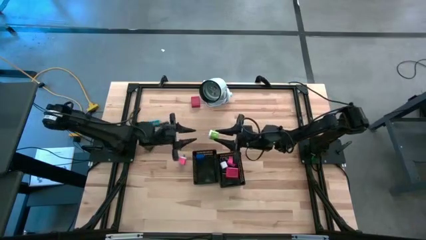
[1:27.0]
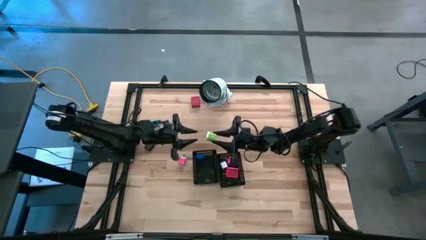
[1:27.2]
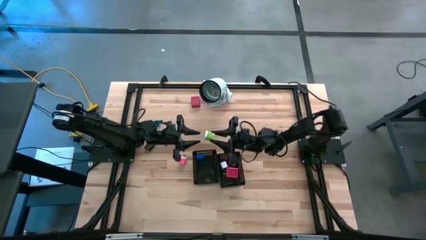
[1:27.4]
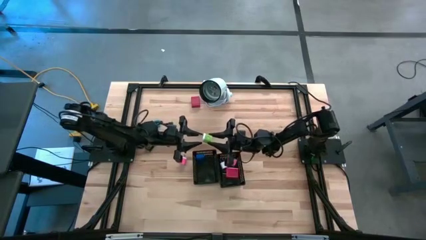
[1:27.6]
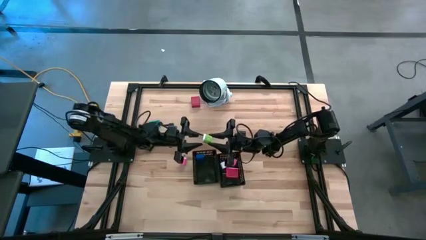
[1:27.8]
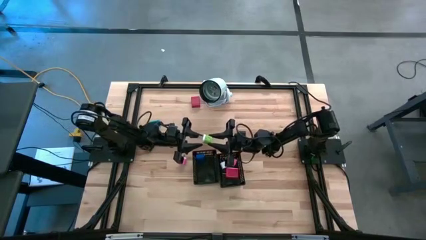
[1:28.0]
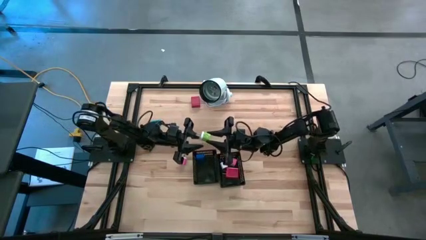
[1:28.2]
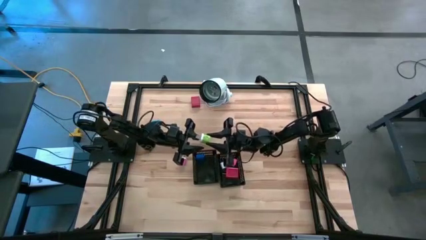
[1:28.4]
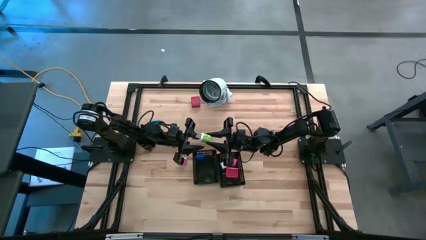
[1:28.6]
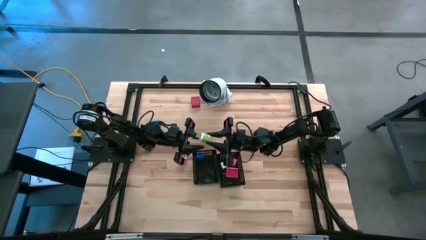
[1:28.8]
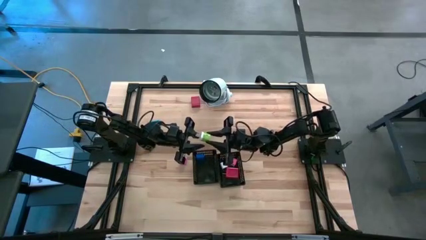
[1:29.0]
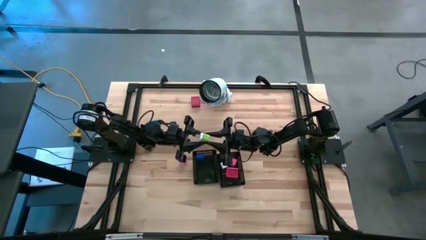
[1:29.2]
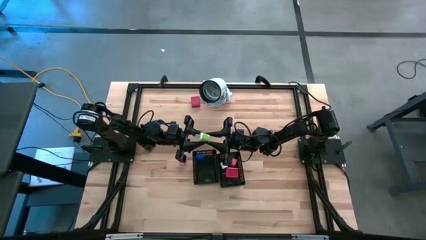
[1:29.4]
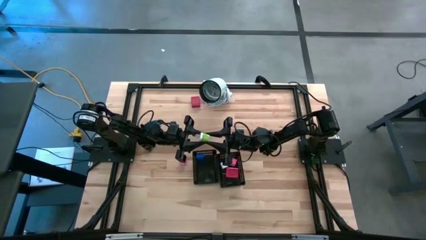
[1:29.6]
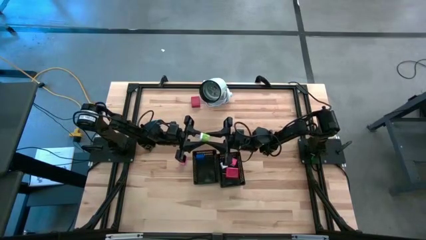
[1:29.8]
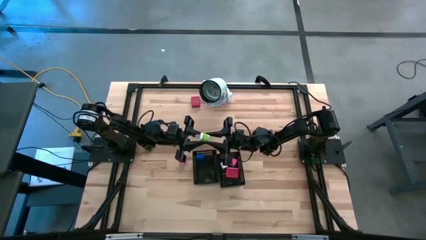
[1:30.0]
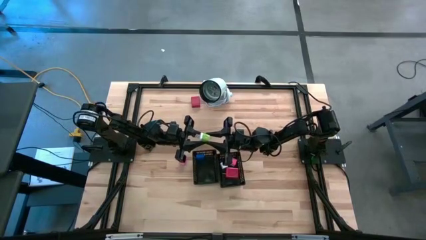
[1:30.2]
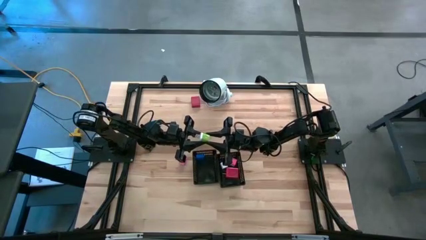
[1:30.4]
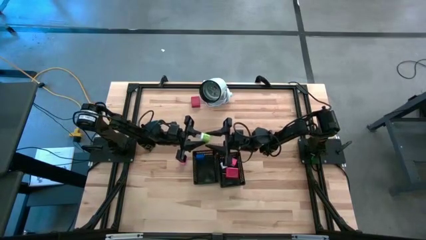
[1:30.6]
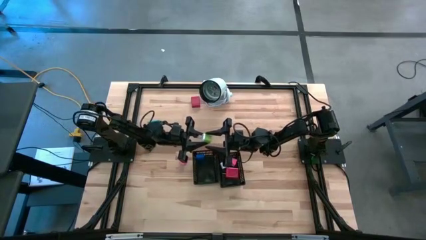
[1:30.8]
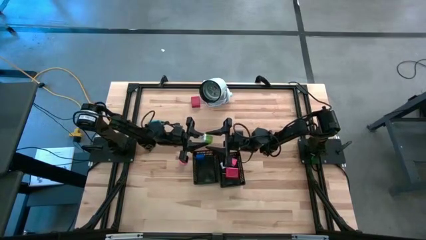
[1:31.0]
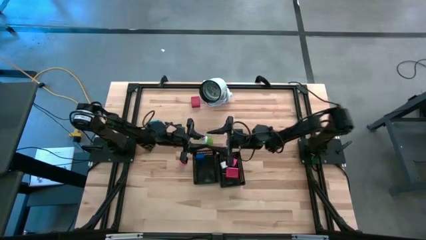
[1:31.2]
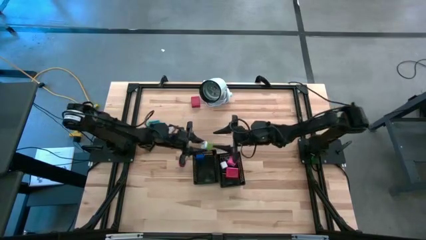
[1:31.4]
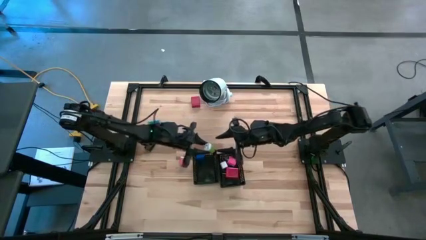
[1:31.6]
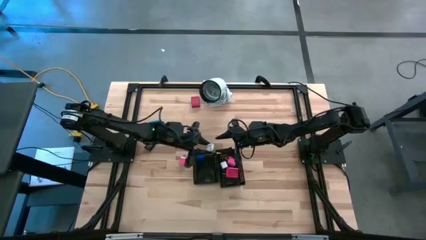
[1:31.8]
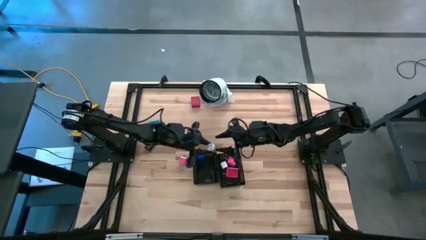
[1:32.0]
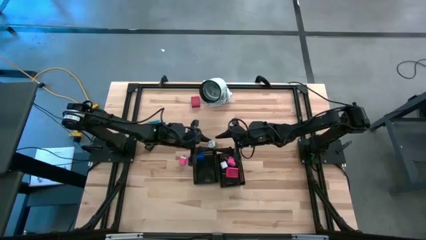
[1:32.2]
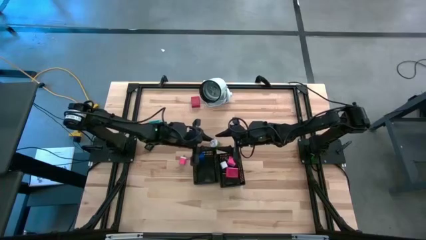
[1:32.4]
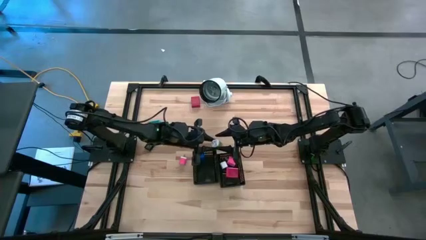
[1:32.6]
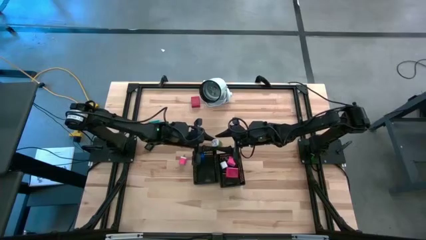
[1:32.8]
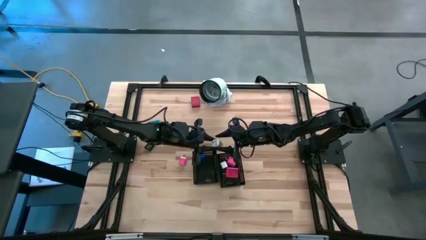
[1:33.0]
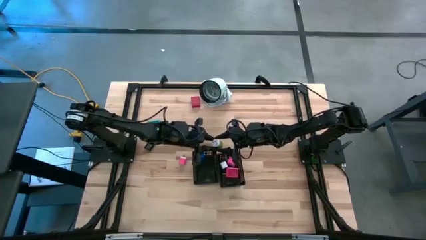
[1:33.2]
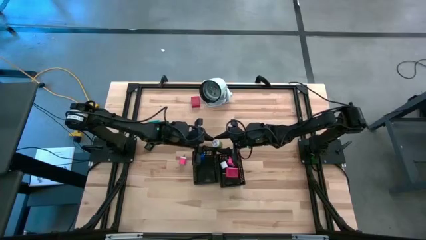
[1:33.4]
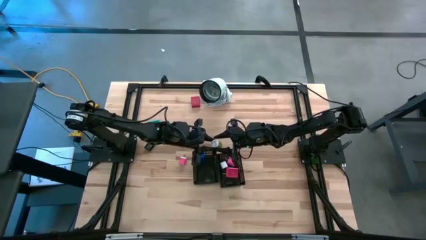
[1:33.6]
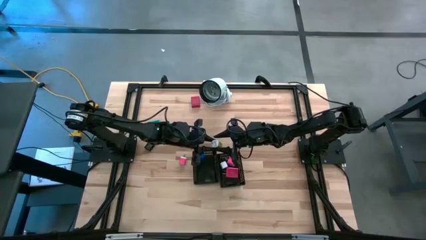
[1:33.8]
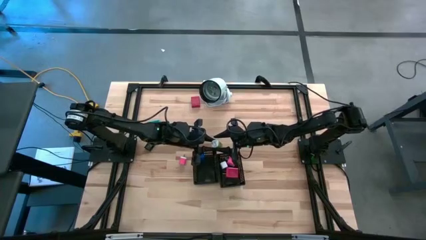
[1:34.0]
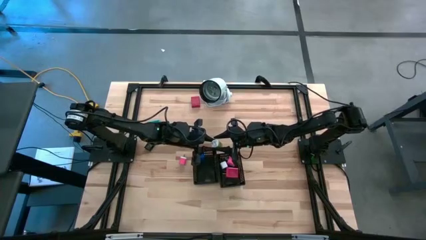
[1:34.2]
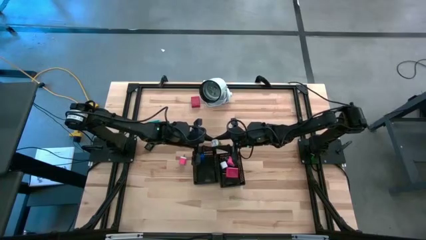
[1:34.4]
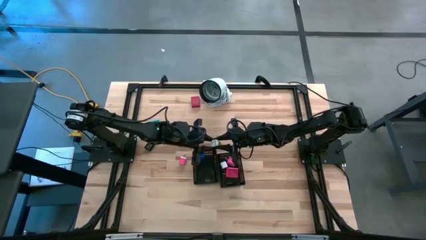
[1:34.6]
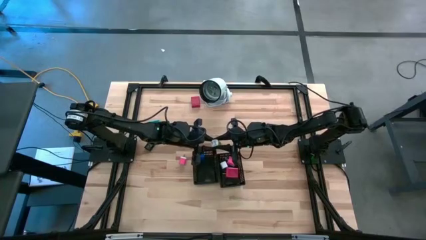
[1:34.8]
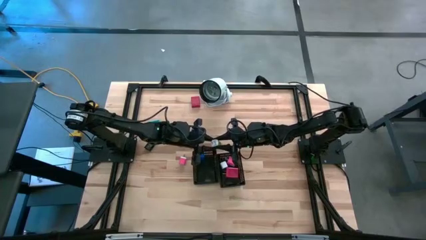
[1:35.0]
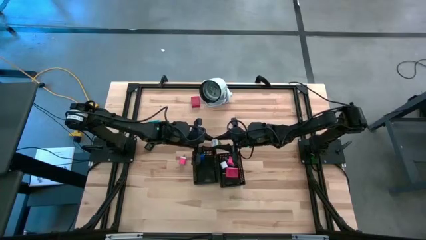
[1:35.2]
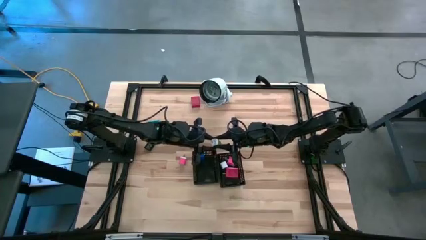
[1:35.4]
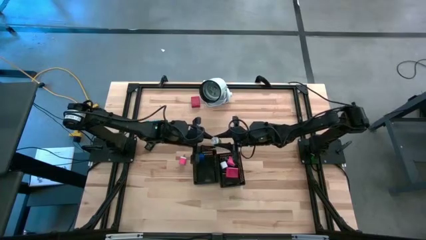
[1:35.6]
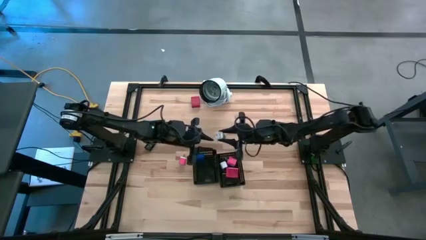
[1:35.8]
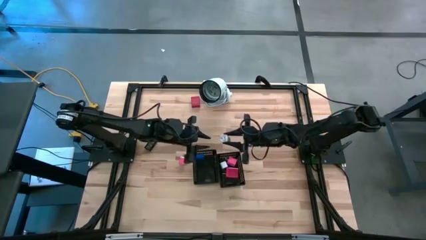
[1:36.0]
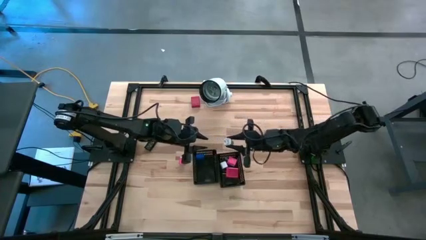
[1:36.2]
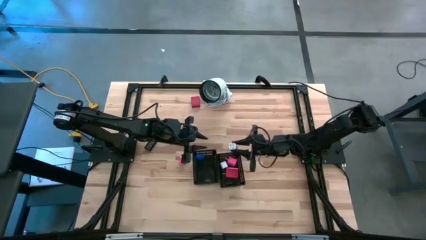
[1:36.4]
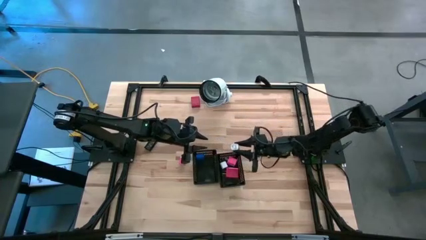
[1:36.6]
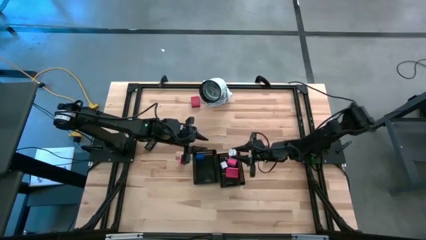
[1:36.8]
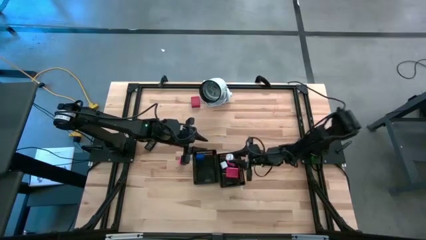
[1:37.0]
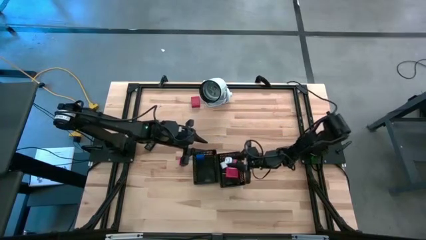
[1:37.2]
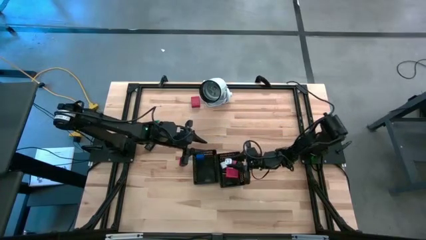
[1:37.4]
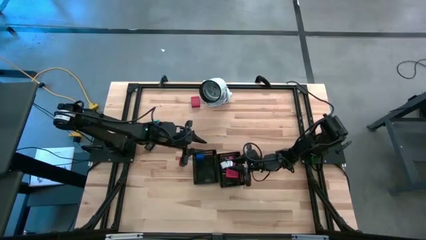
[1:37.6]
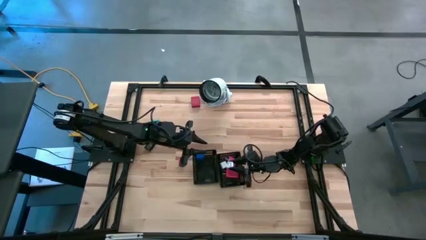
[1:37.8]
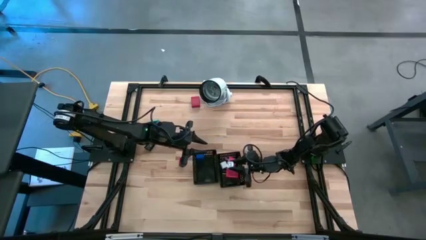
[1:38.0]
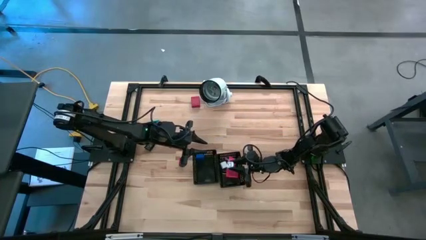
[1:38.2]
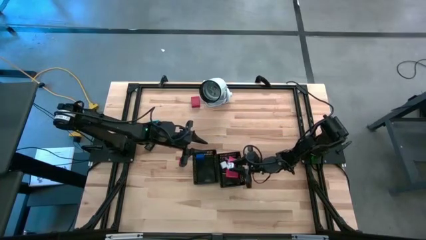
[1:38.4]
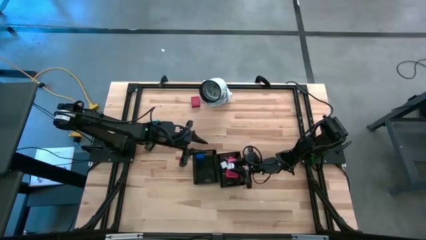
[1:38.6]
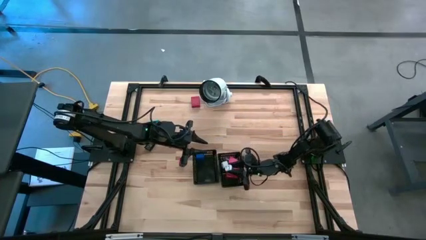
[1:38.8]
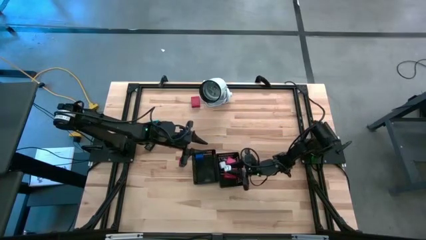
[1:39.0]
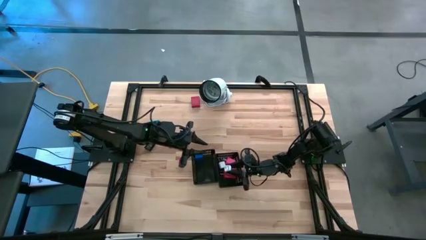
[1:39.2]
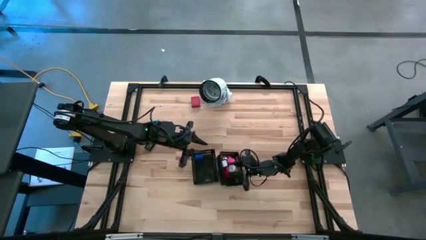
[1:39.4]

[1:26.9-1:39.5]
Task: Pick & Place Office items
Put the green charger adapter into the right black bin

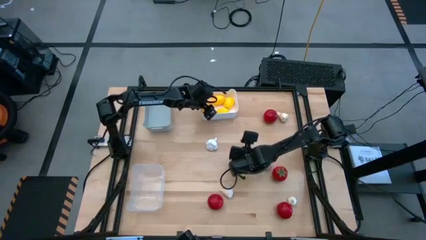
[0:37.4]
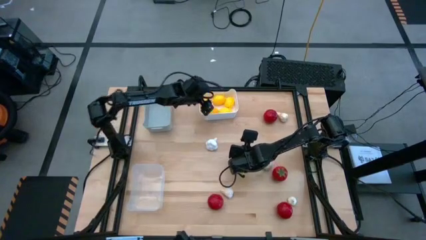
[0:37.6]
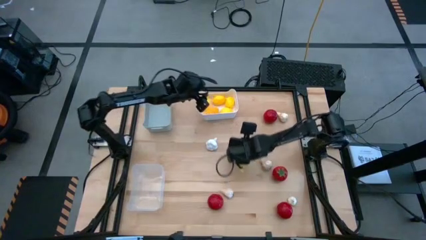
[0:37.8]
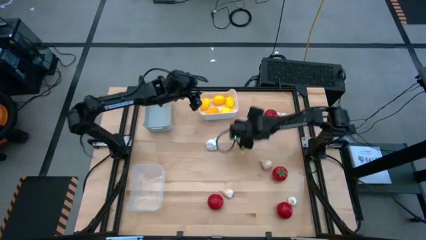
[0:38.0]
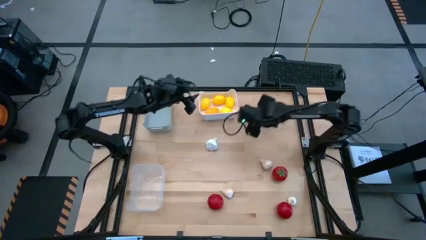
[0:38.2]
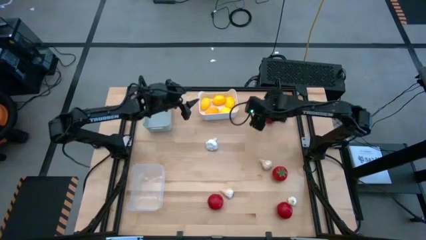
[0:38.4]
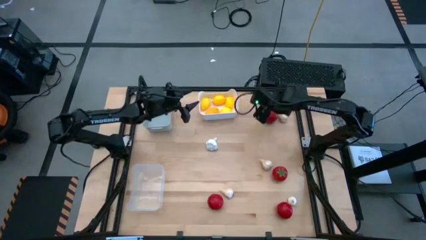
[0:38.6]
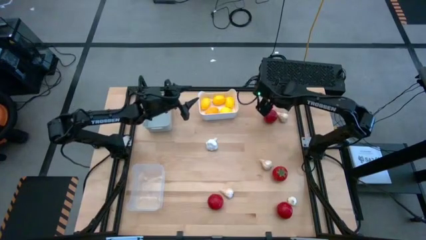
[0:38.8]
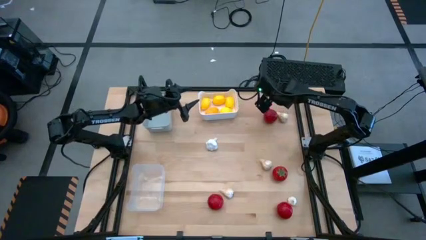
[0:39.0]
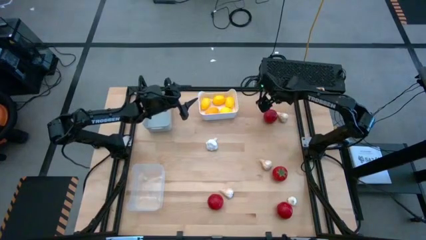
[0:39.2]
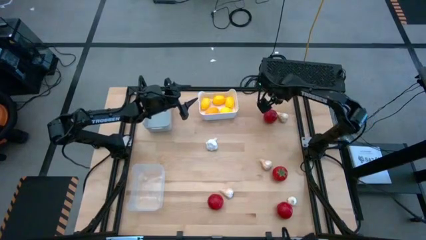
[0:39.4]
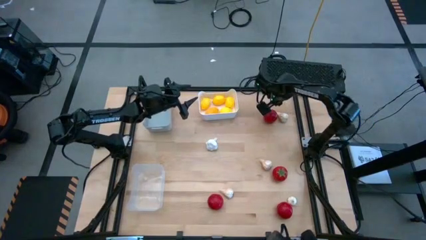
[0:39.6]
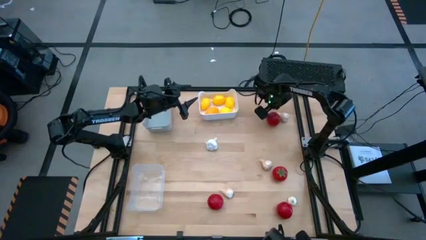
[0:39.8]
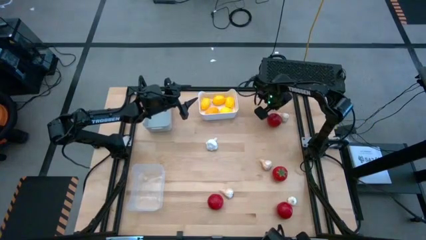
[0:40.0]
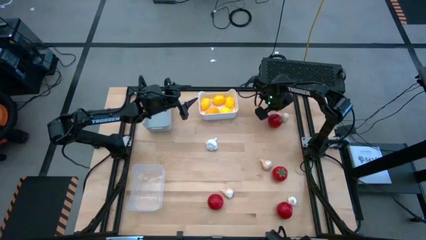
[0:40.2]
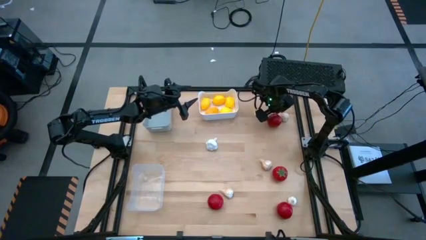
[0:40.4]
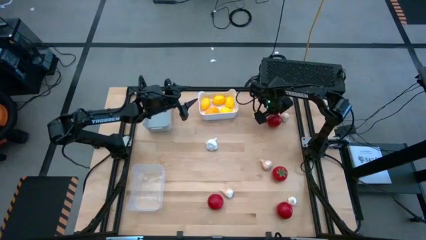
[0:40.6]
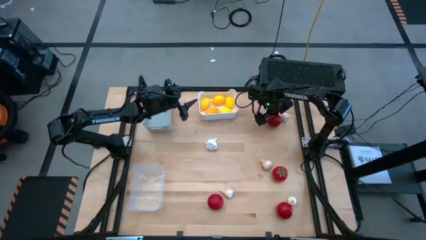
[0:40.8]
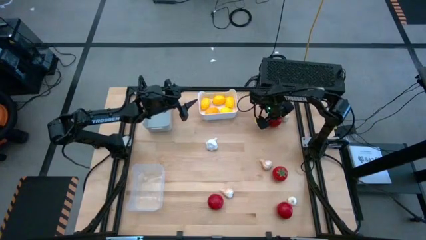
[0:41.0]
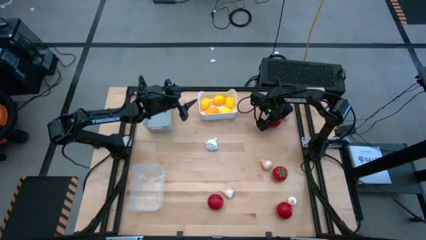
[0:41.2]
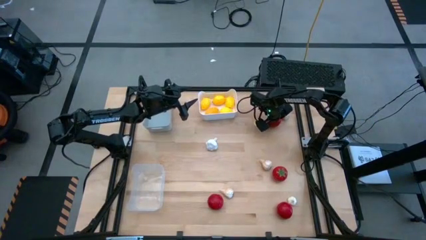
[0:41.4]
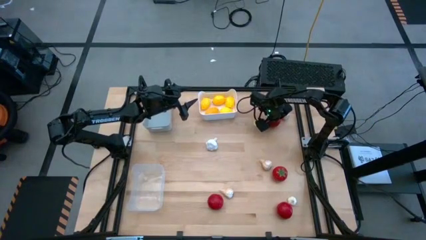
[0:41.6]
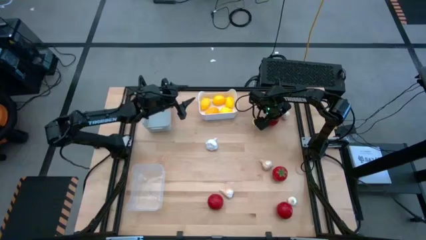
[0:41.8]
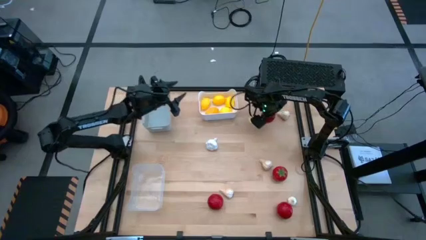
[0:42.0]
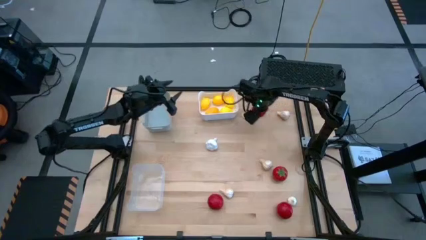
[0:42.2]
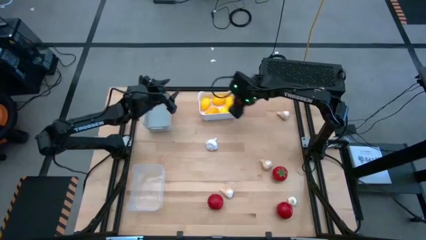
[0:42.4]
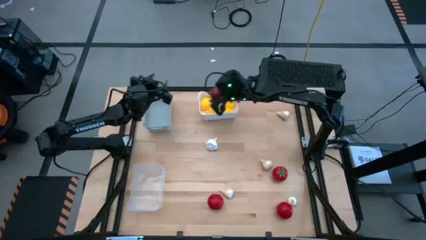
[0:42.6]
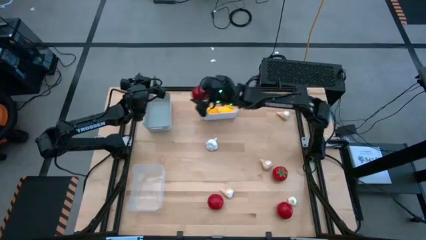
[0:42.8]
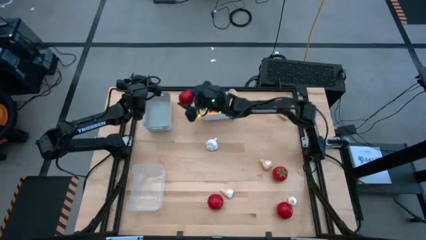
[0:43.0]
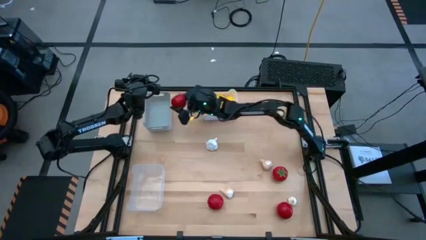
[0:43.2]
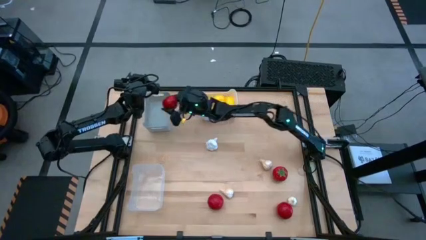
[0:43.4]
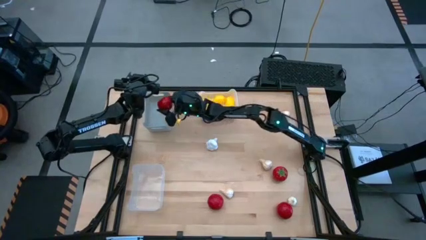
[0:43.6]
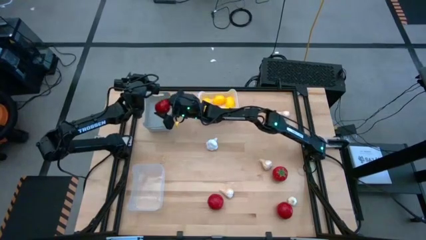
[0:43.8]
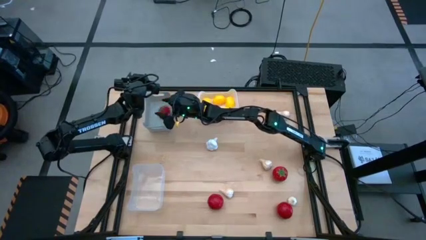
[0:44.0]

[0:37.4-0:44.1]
Task: Sort produce into baskets
Put the tomato into the gray bin
